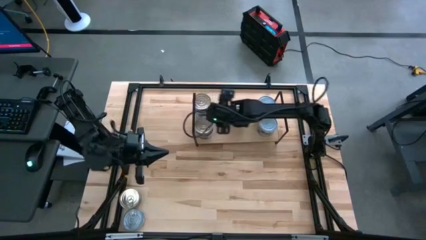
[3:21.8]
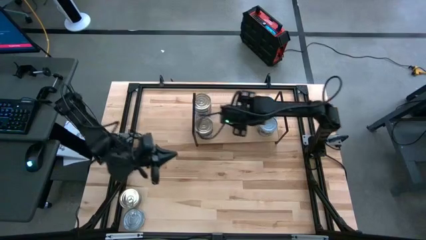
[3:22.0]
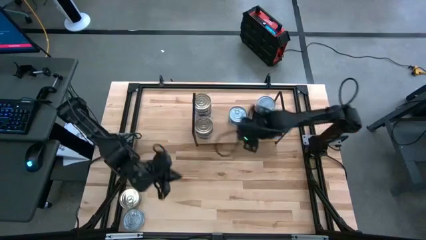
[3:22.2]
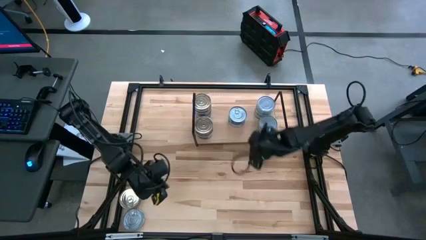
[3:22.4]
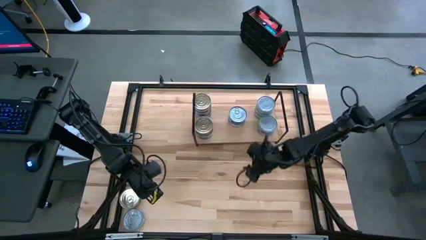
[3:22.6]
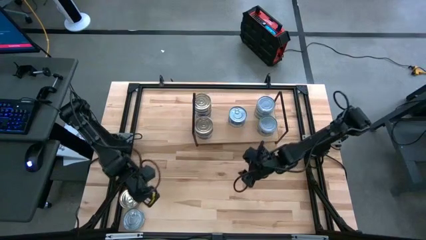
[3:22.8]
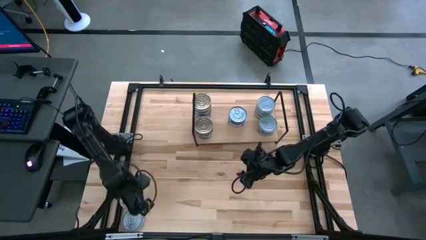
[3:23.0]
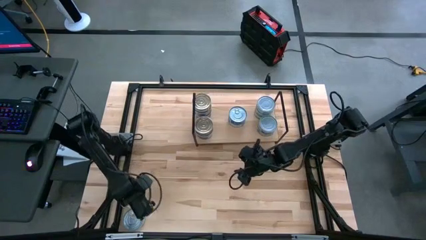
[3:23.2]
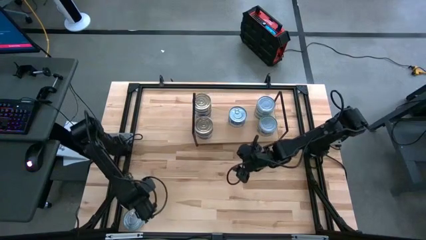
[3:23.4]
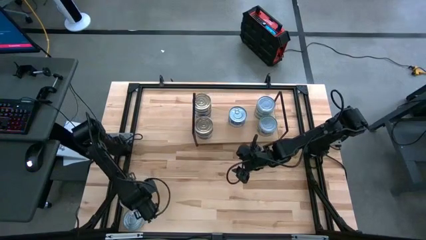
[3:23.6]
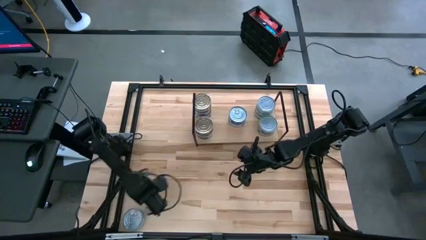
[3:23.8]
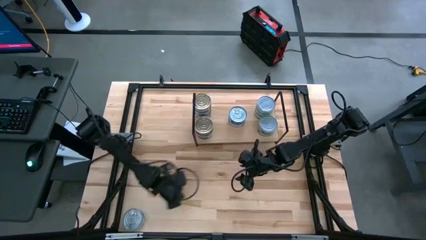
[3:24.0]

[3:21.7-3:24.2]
Task: Stack canned seafood by type on shelf
Move the blue-pink tuna can to the center of the table

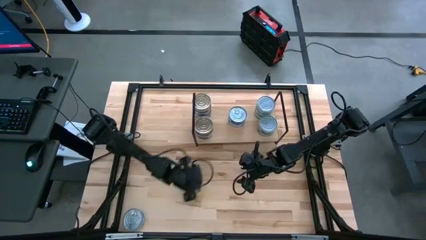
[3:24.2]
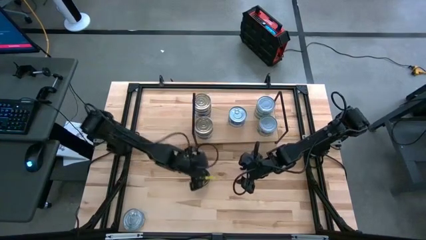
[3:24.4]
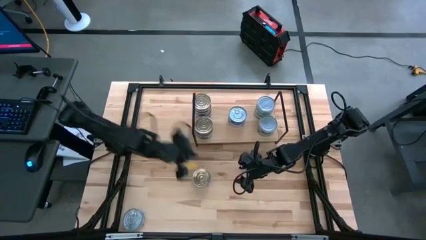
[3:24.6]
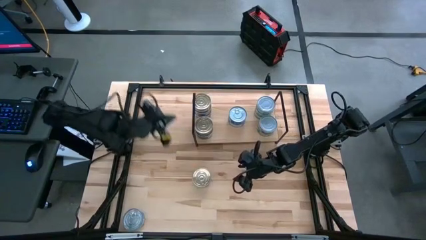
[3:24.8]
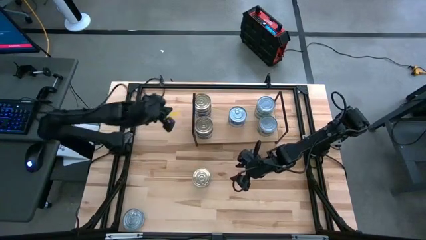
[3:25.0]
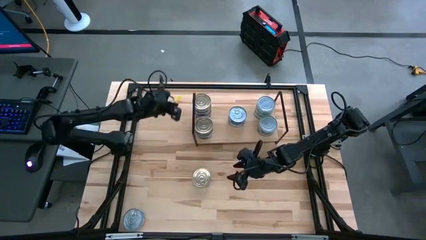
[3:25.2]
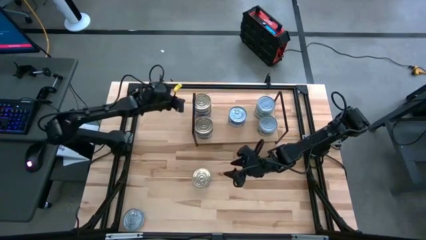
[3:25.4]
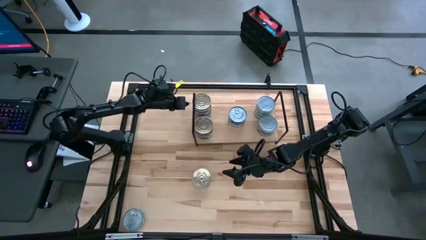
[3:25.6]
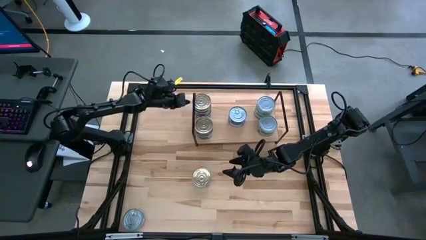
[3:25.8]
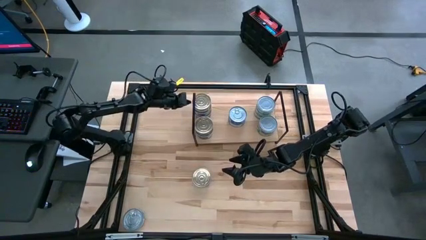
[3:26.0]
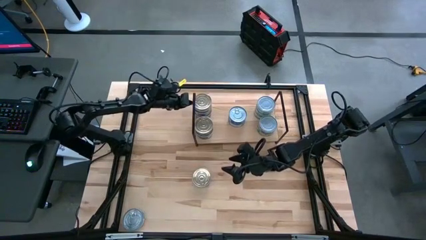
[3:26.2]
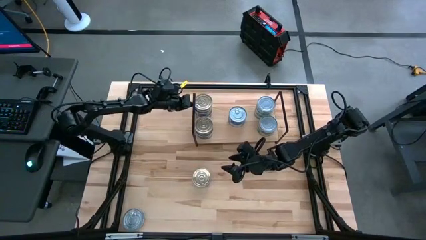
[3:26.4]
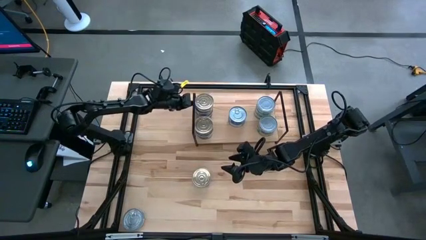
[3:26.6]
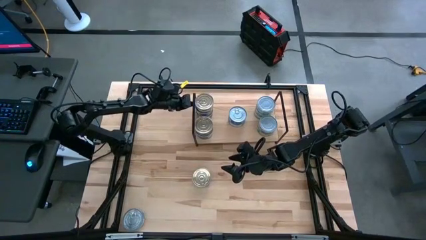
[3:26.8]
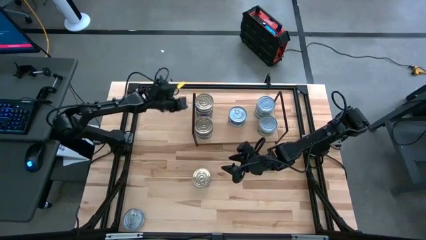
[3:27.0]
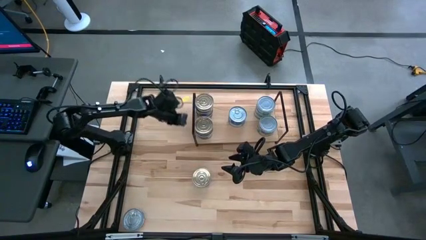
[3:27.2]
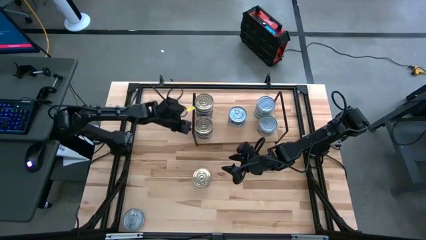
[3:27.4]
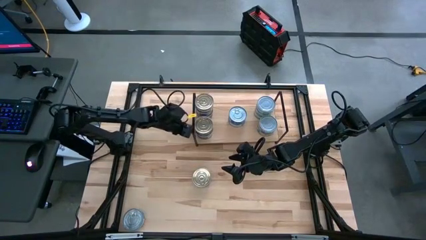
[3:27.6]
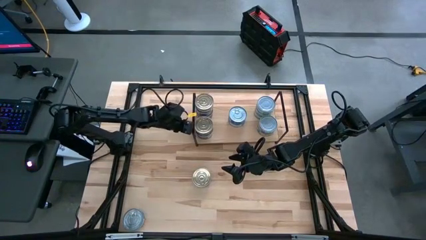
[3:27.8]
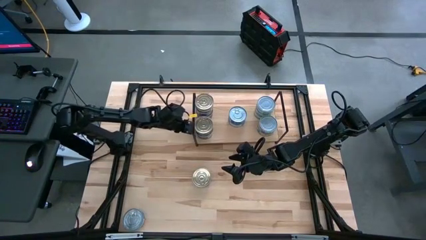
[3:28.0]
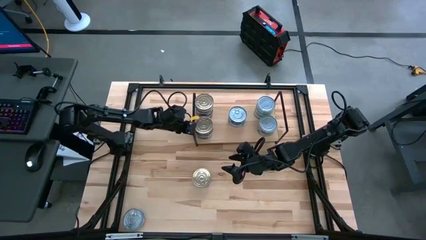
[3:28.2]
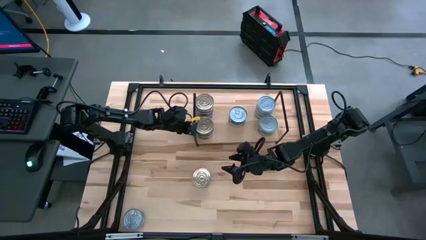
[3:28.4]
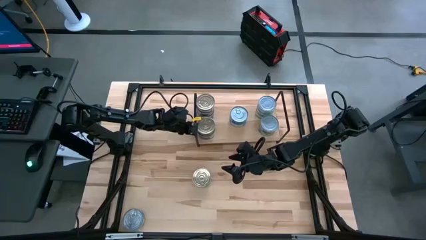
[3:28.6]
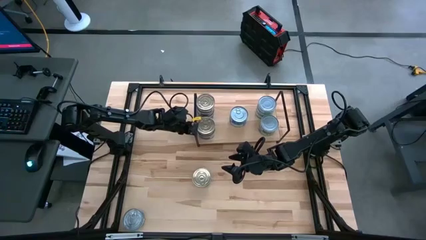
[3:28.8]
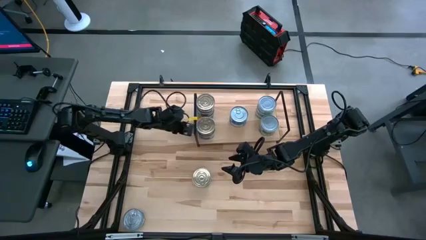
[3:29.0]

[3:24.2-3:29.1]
Adjust the stacked blue-pink tuna cans on the shelf

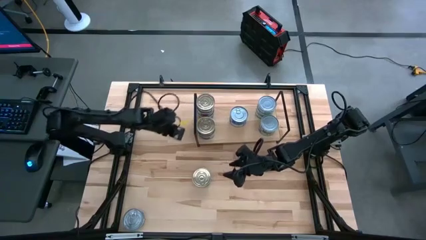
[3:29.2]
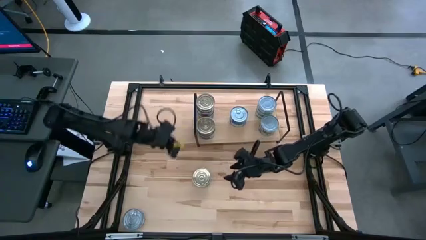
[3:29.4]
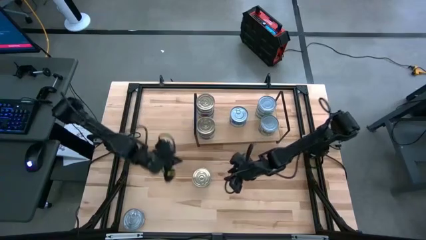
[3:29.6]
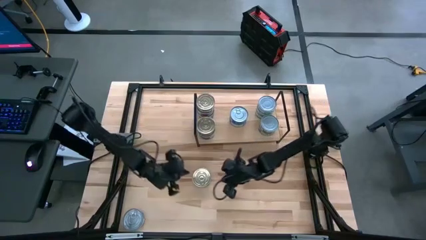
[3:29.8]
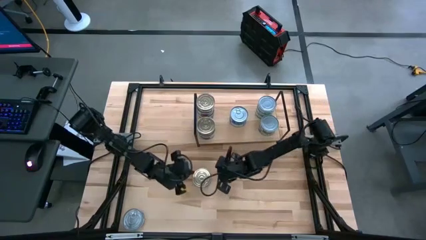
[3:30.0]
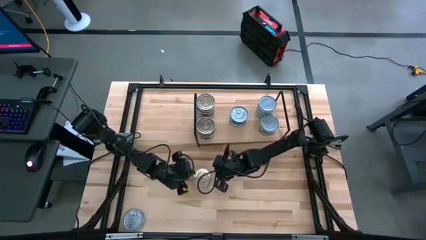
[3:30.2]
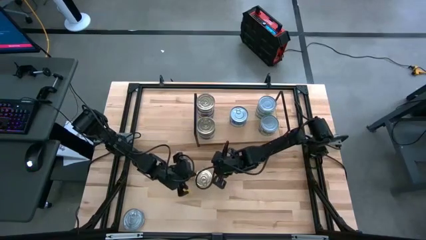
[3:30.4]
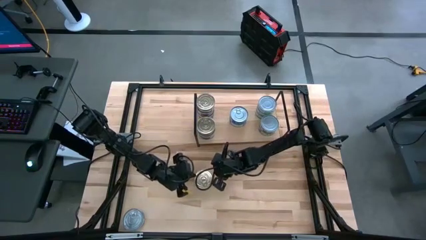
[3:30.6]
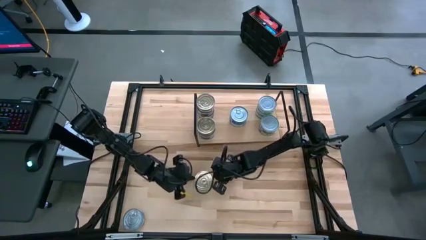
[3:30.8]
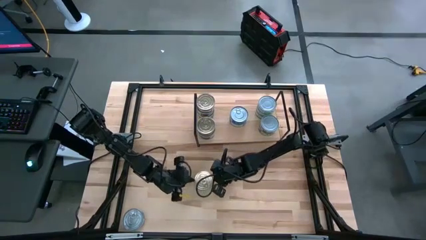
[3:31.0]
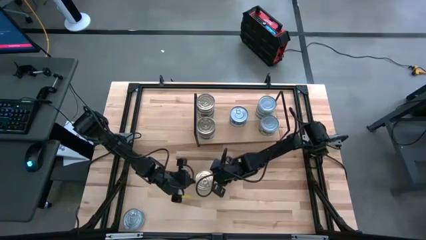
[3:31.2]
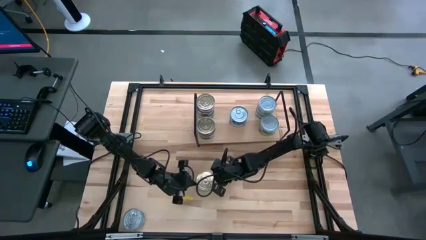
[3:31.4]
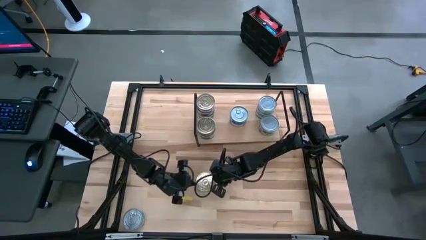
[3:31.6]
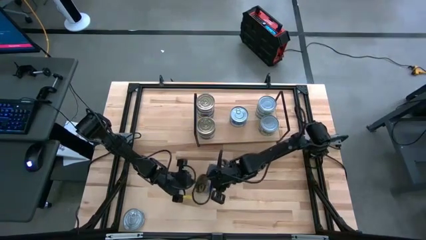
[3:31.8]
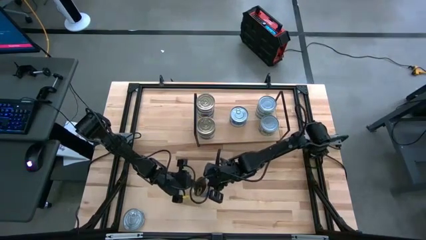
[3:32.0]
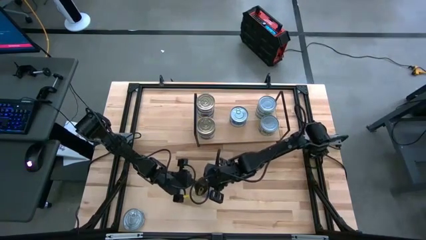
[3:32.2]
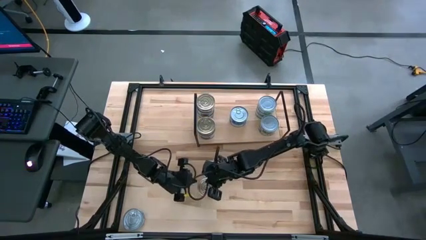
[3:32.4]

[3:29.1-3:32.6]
Stack the blue-pink tuna can on top of the other blue-pink tuna can on the shelf

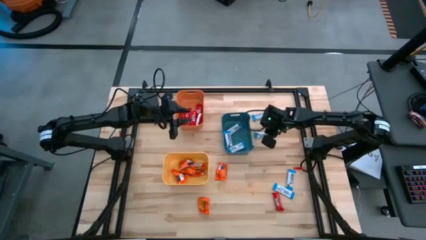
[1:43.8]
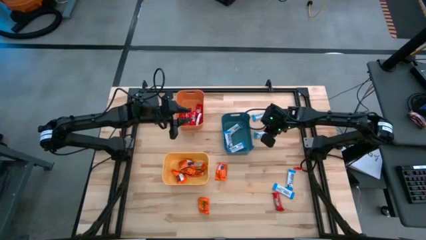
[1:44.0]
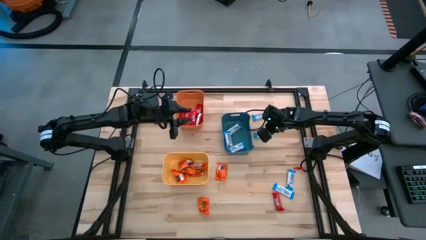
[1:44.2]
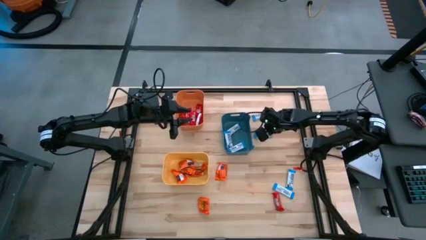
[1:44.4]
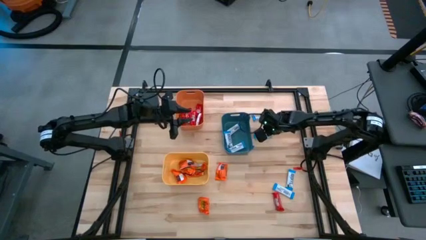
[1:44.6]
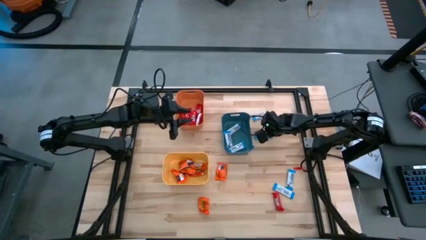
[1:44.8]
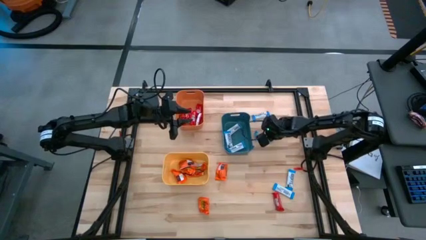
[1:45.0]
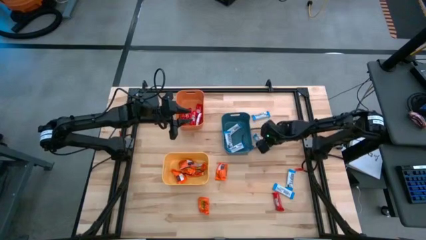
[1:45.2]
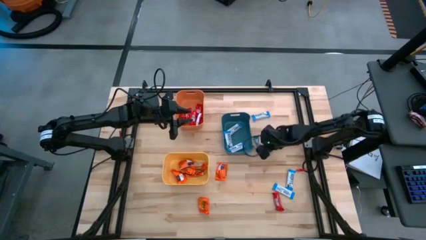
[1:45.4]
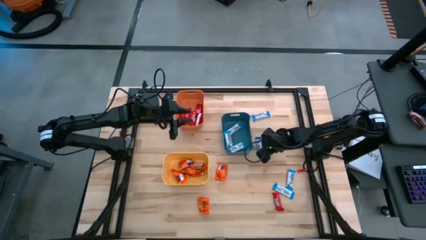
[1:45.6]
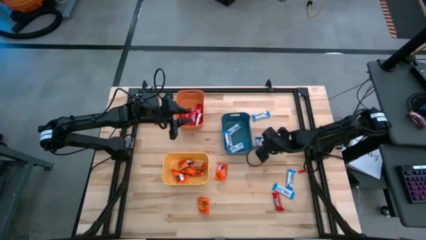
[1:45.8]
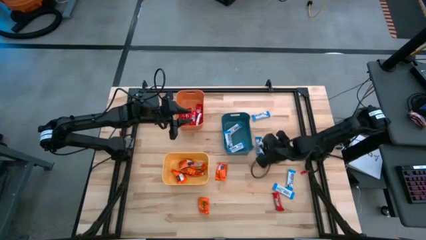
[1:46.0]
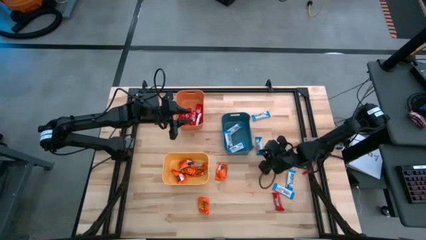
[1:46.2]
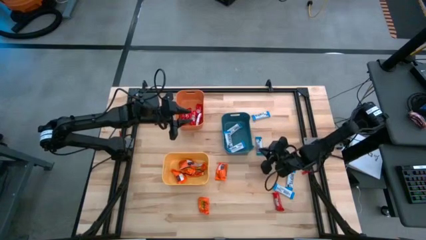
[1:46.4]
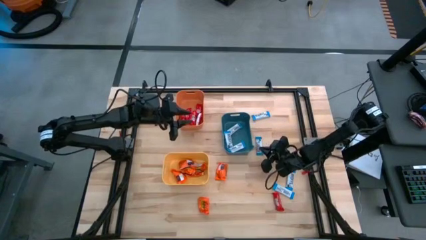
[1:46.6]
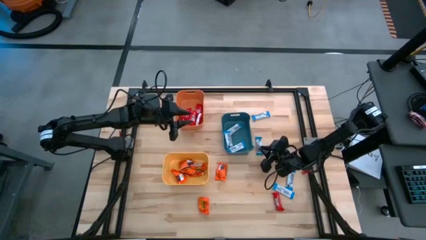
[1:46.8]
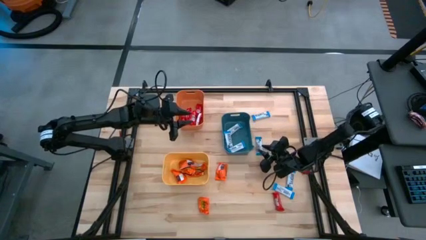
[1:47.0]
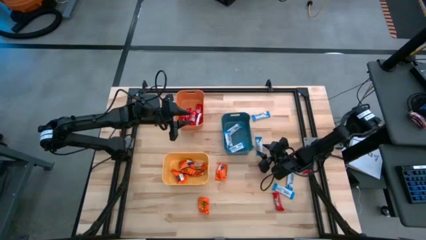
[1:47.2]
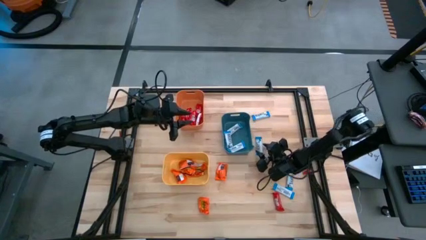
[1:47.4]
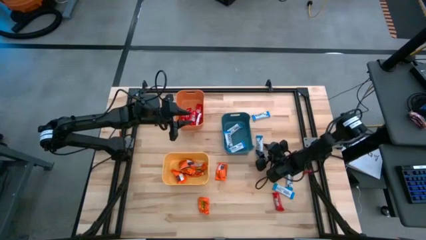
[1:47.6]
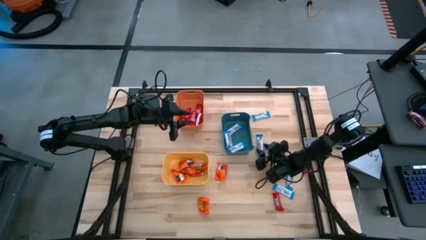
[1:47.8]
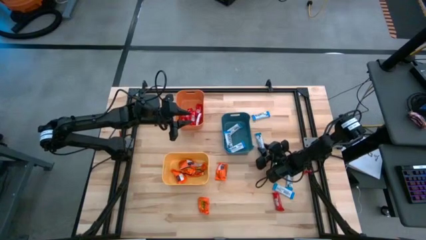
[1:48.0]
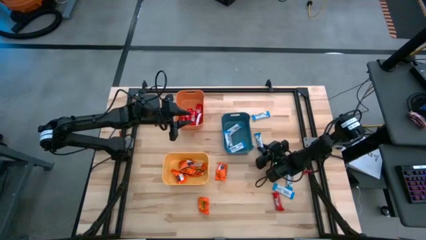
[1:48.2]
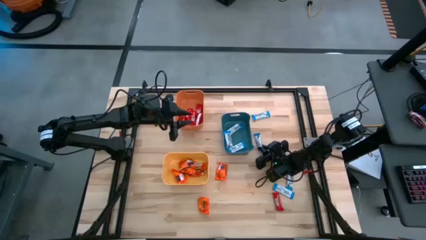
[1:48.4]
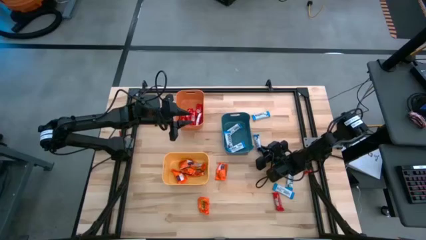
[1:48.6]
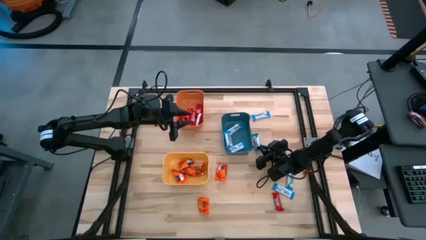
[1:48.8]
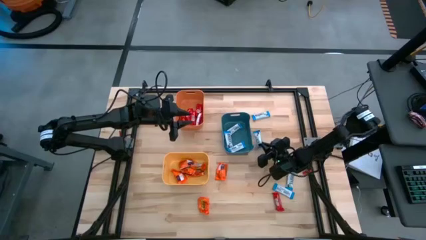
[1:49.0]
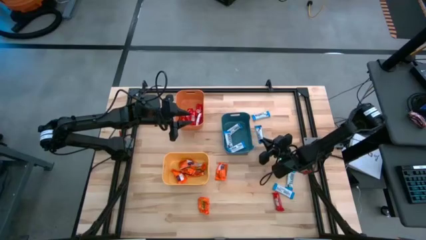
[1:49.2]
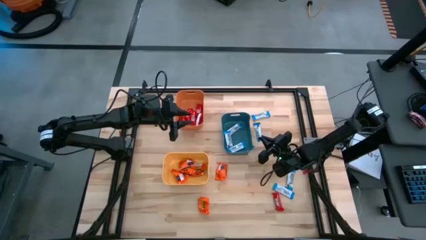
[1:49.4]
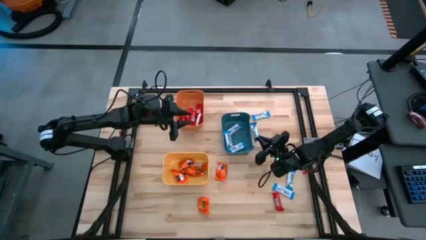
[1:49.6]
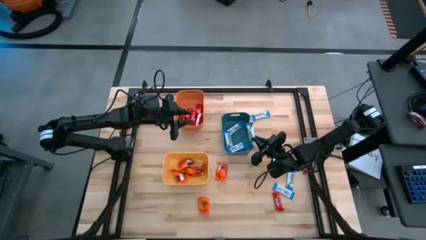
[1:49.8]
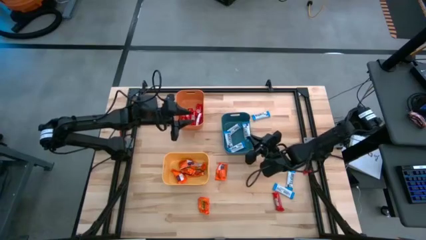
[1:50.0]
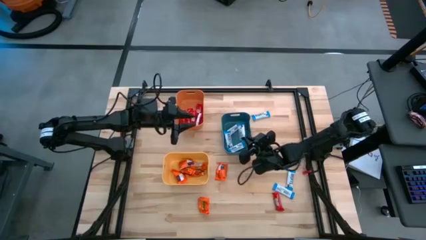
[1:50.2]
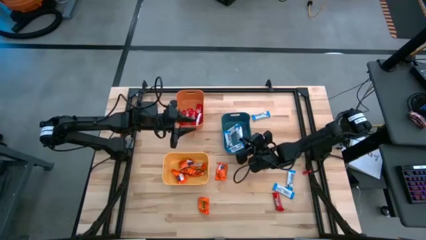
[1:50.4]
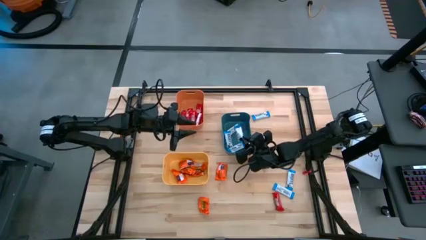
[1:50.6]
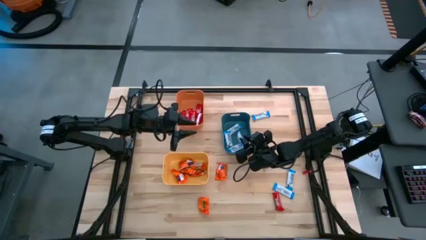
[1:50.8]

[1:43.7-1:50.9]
Task: Organize candy in baskets
Put the white chocolate into the blue bin
